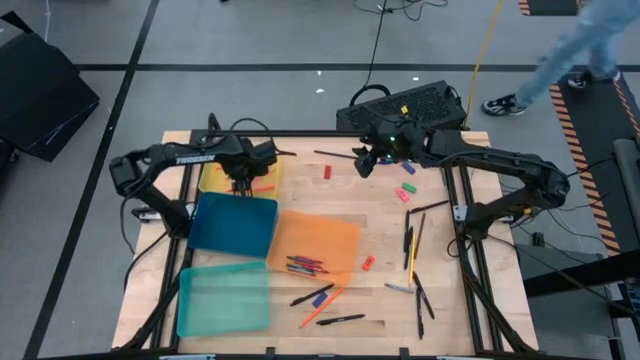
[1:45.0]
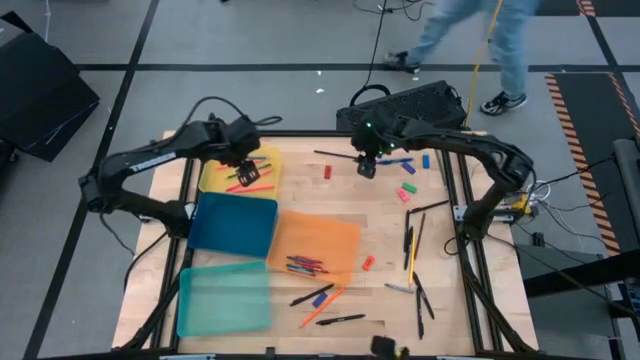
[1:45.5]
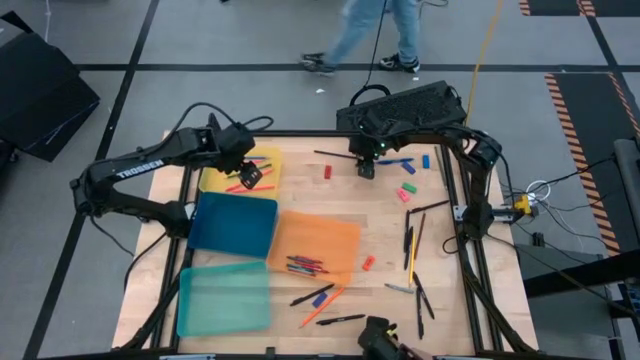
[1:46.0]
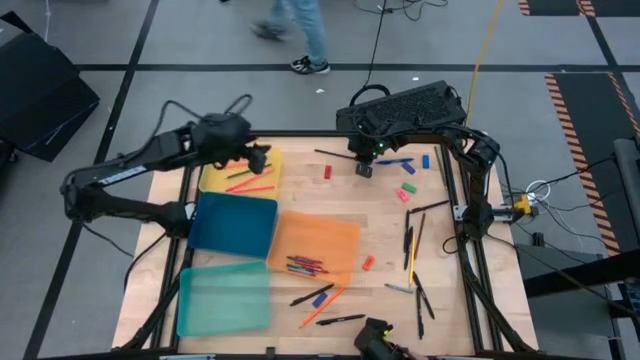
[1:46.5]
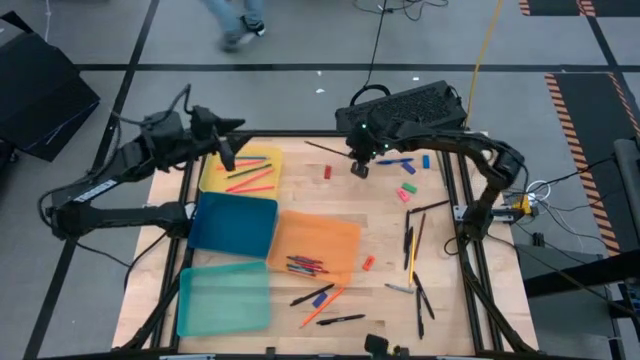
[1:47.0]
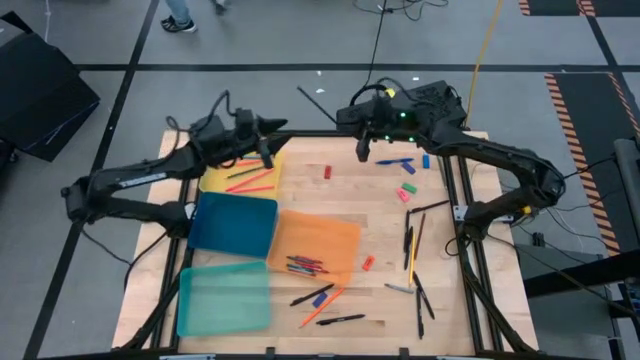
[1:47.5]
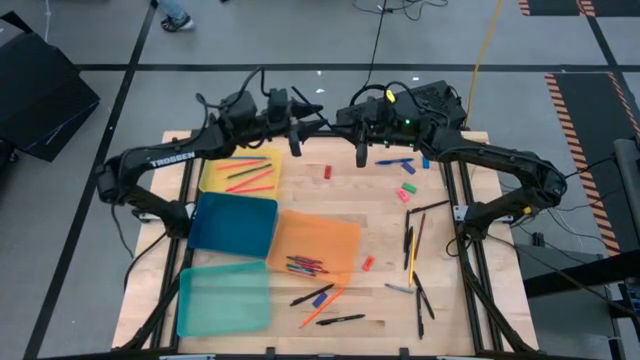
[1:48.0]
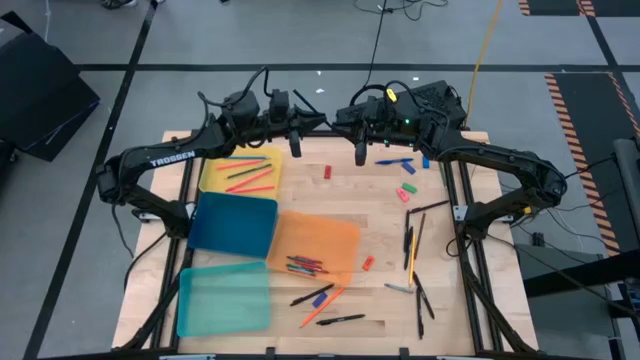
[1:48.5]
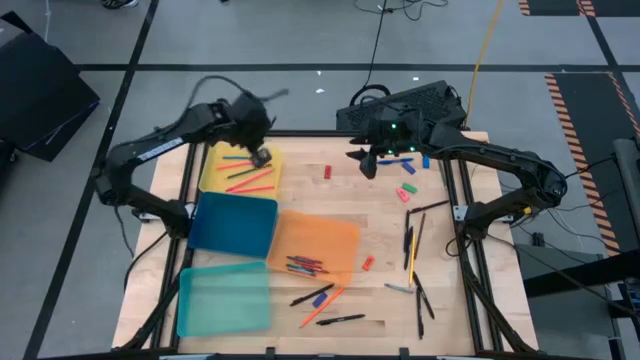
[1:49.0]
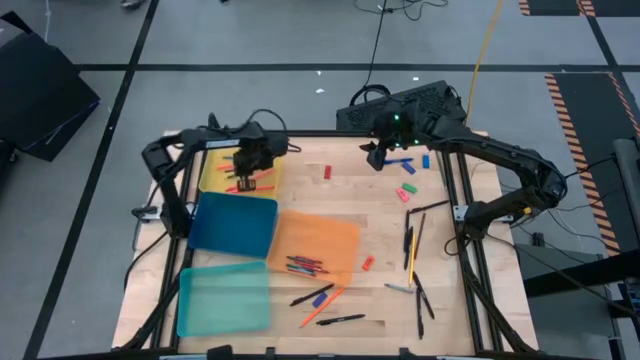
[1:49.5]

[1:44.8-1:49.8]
Task: Sort crayons/erasers/pens/pencils in bins
Put the black pencil into yellow bin

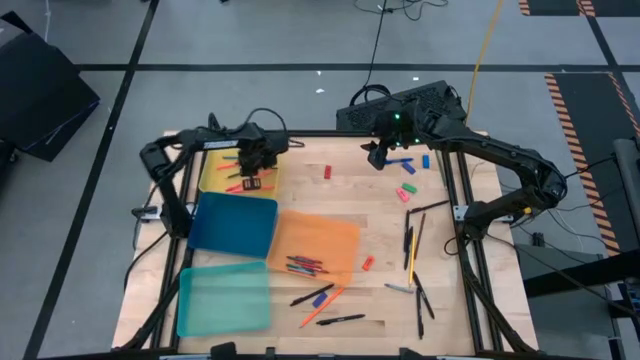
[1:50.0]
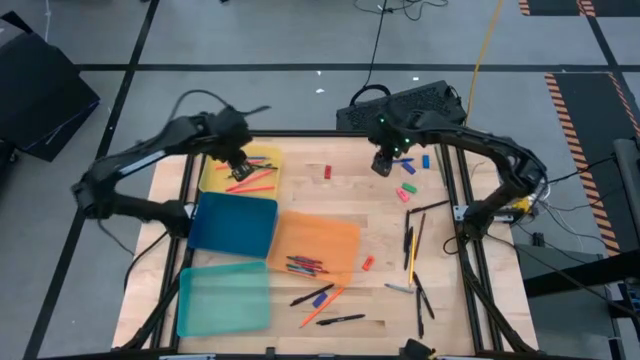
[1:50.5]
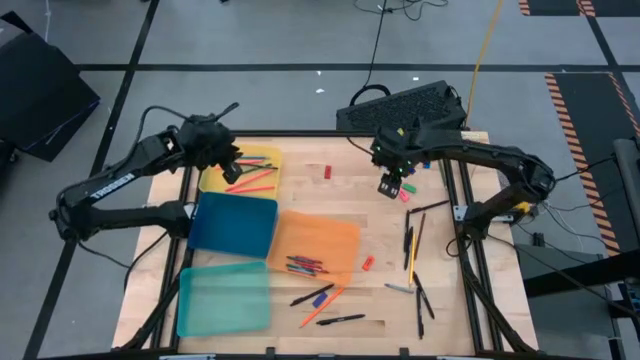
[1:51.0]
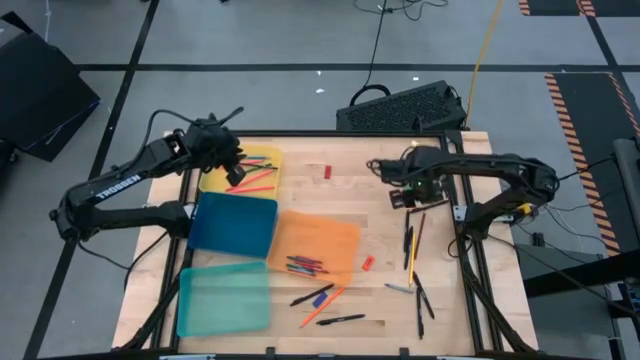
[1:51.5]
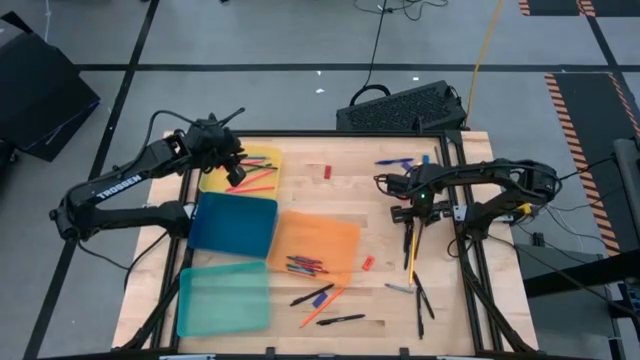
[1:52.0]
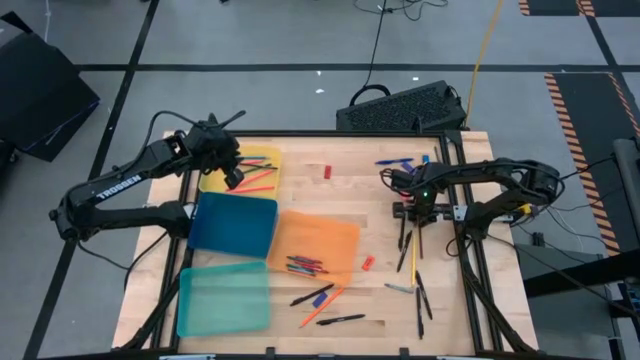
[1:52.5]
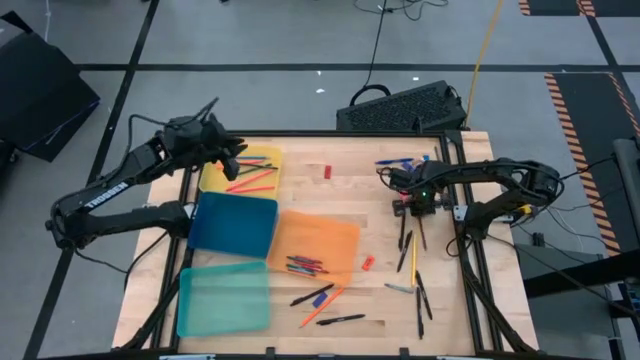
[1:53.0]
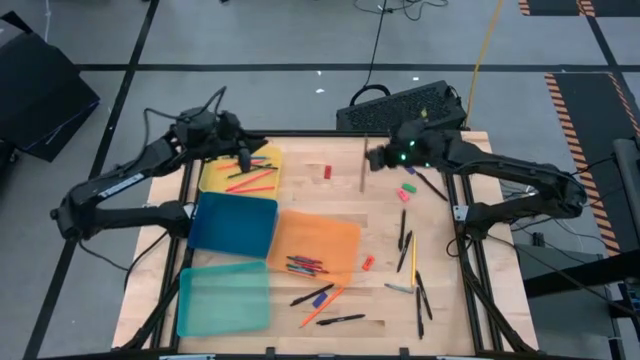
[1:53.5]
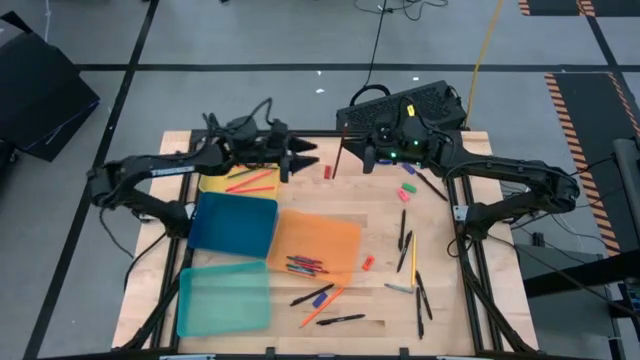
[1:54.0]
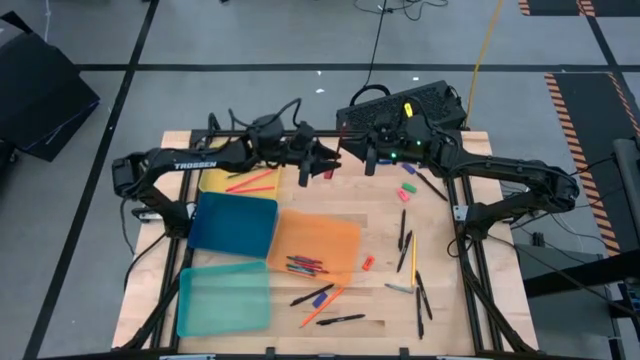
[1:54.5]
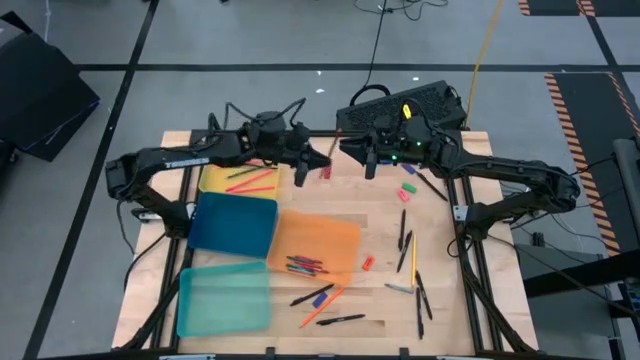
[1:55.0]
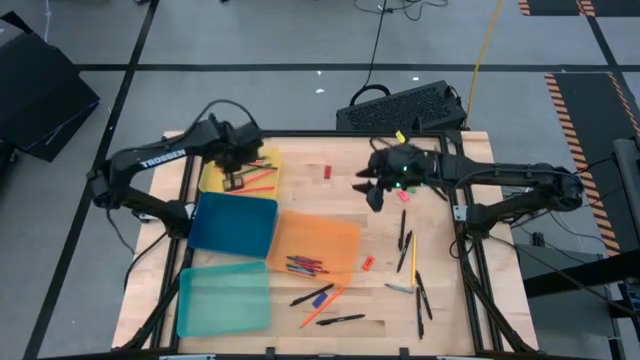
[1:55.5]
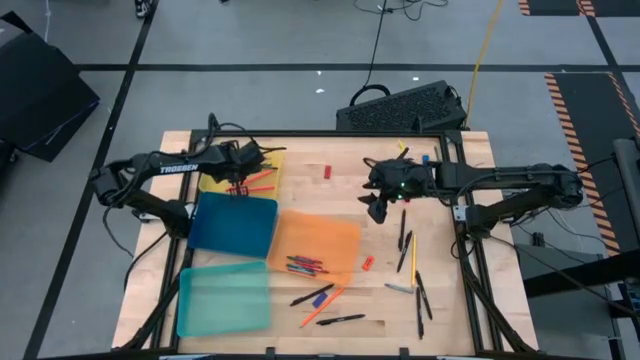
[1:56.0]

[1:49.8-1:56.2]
Put the brown pencil into yellow bin

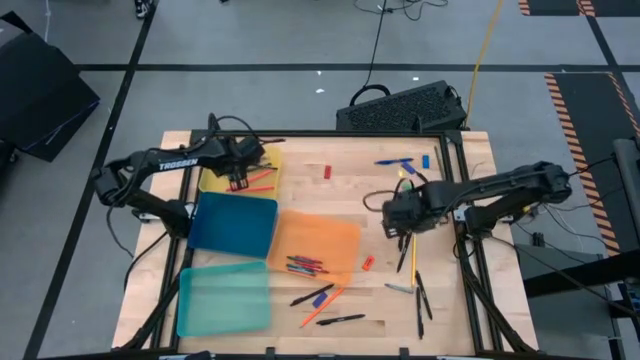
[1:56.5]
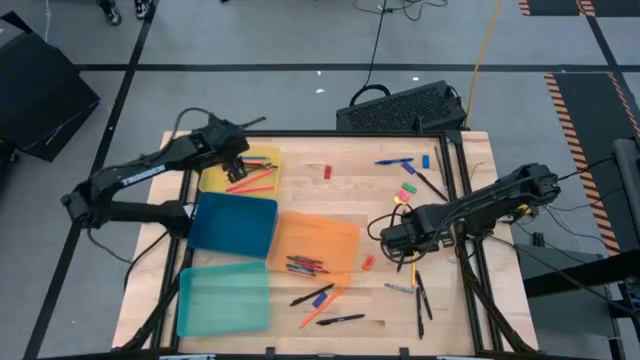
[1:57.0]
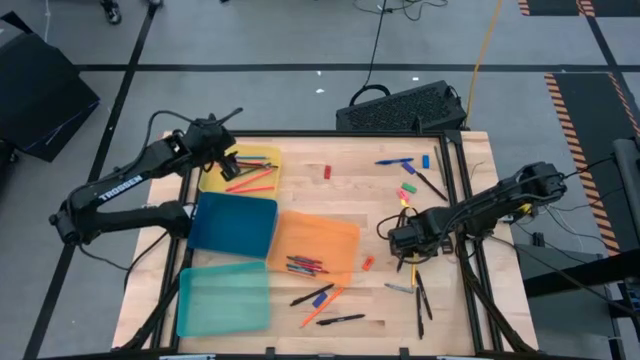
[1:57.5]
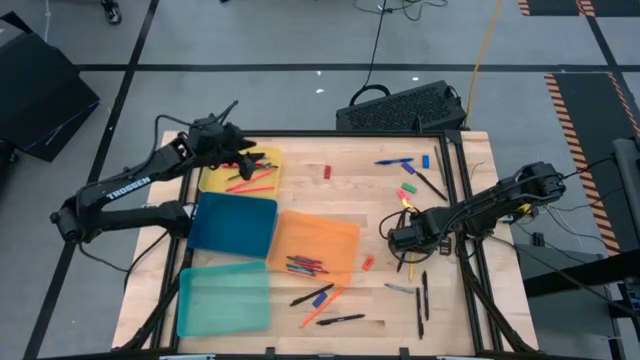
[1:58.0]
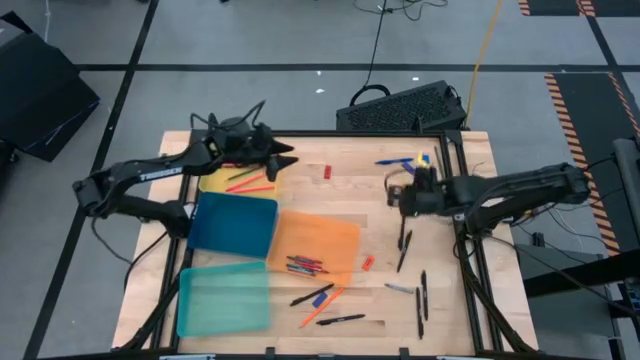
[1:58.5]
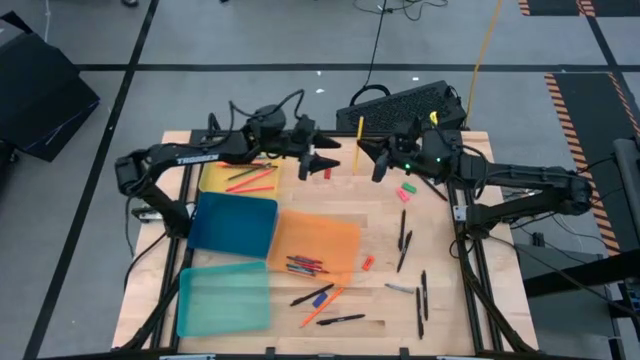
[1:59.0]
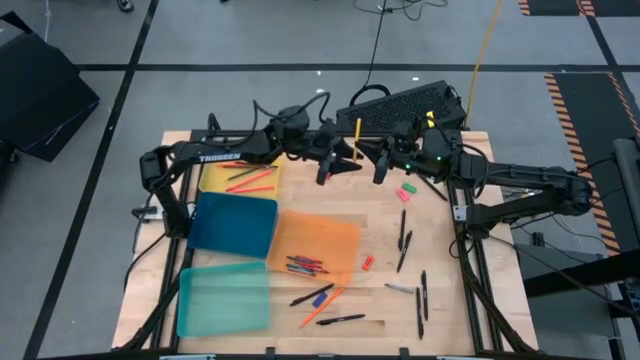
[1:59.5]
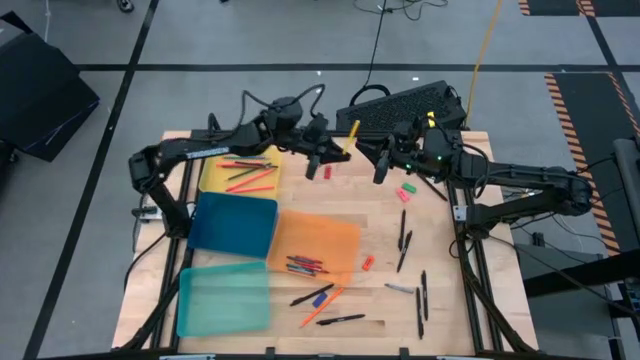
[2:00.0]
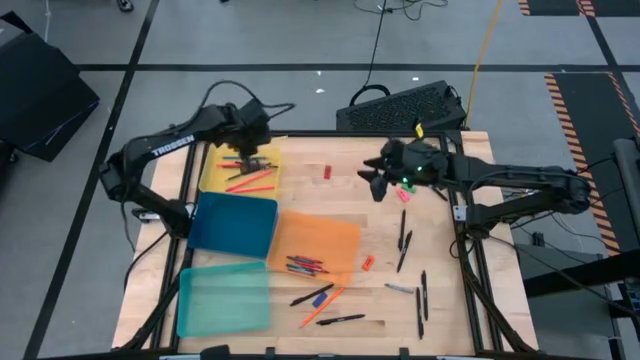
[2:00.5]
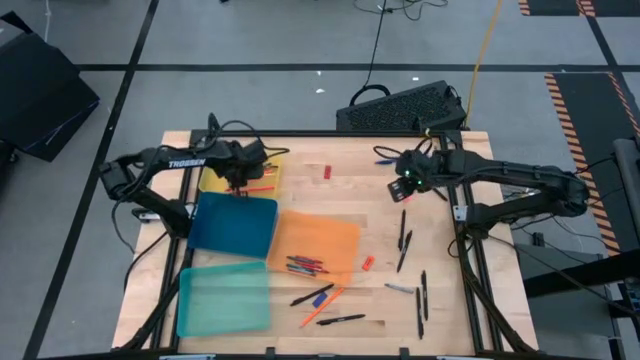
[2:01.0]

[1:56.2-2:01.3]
Put the yellow pencil into yellow bin

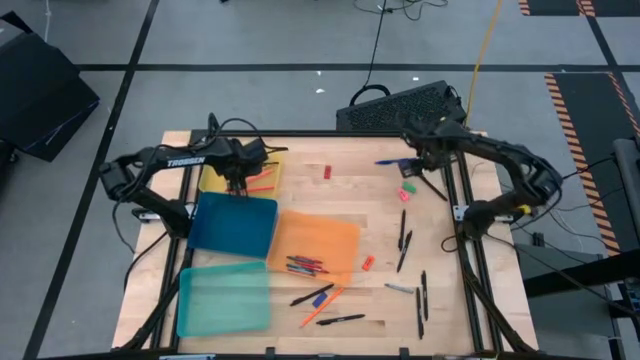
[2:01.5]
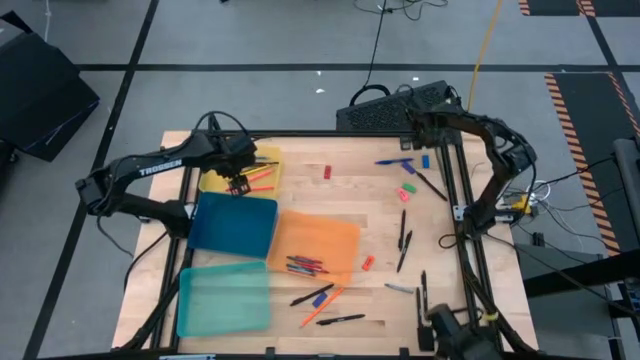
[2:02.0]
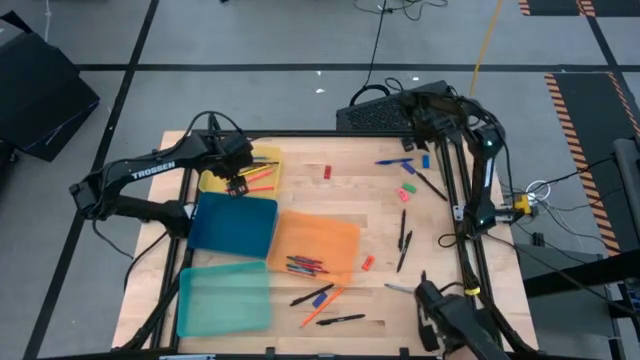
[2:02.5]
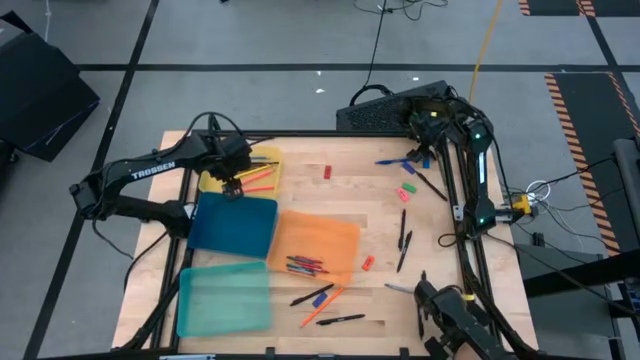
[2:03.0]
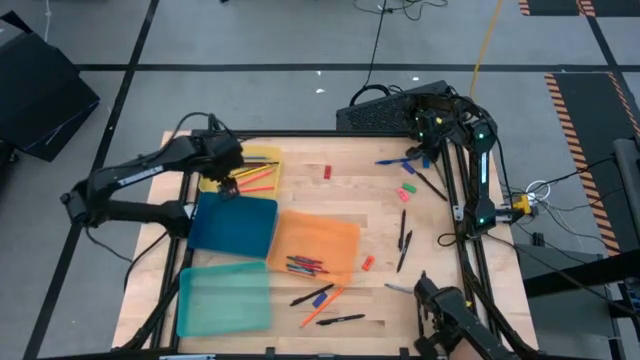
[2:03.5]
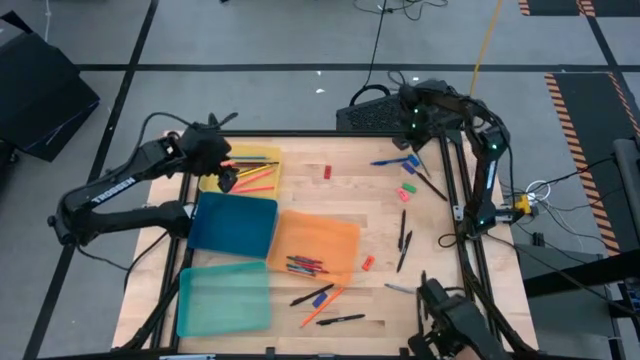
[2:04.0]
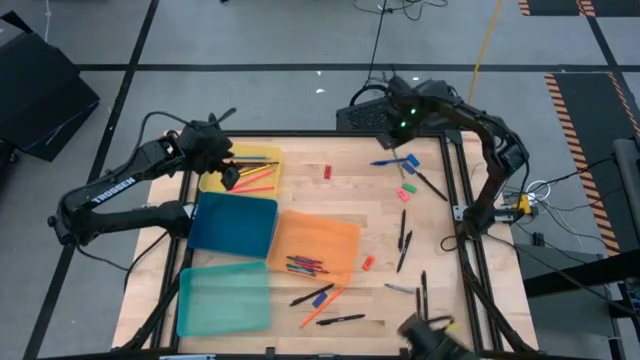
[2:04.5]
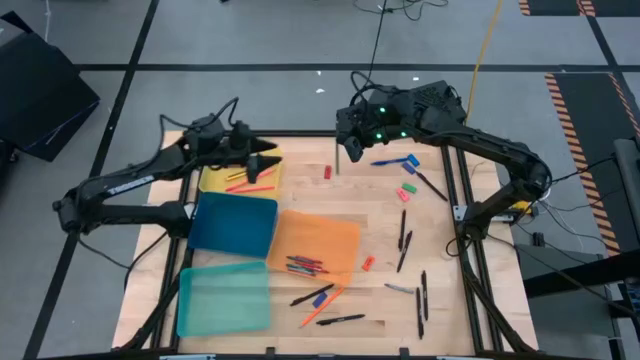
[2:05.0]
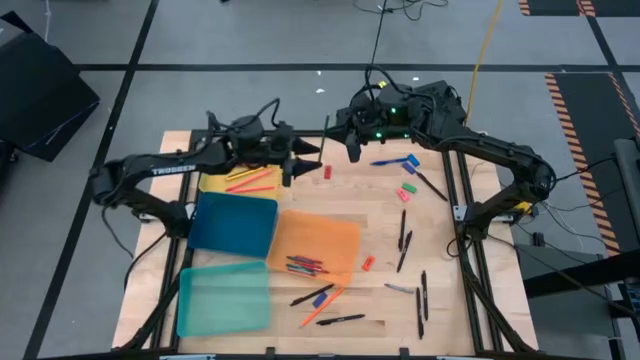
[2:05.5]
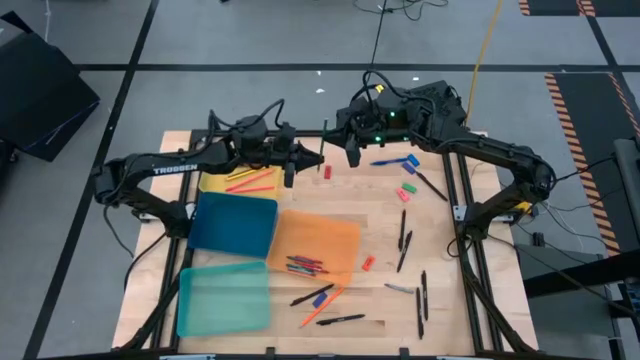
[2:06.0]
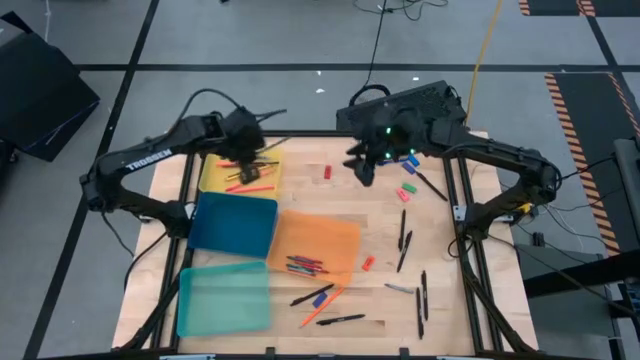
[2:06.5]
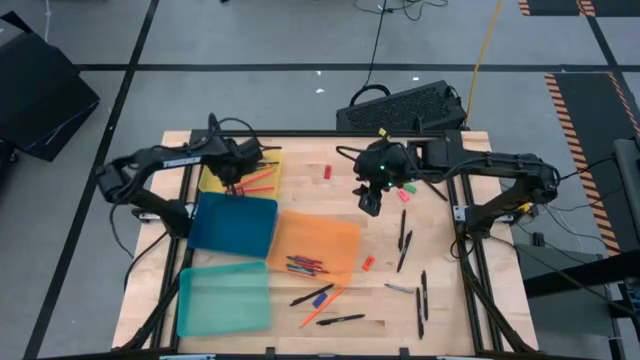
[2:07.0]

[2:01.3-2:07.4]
Put the green pencil into yellow bin
